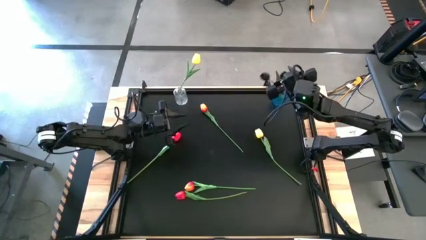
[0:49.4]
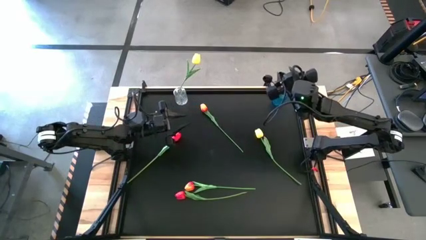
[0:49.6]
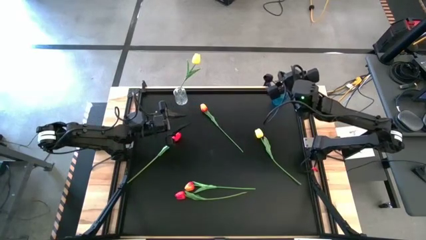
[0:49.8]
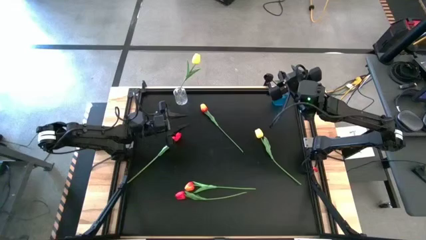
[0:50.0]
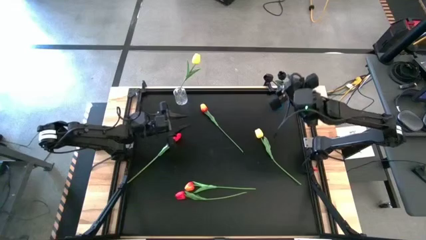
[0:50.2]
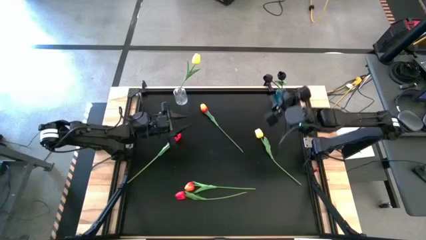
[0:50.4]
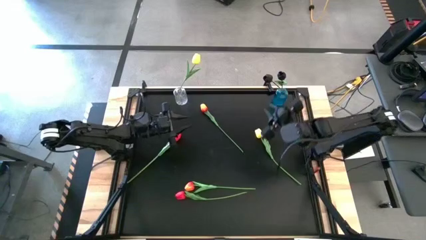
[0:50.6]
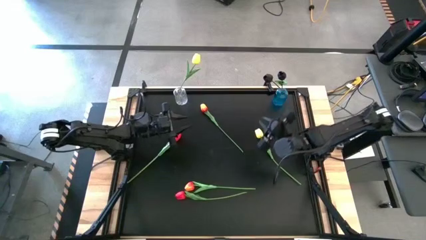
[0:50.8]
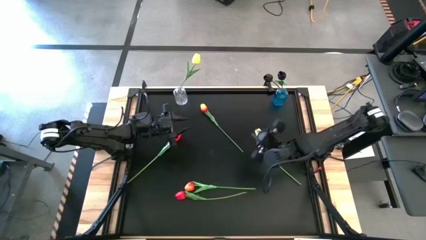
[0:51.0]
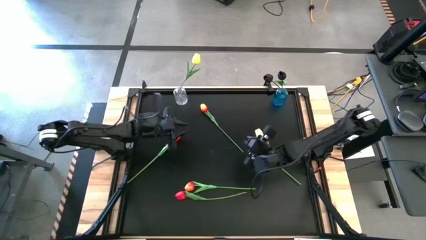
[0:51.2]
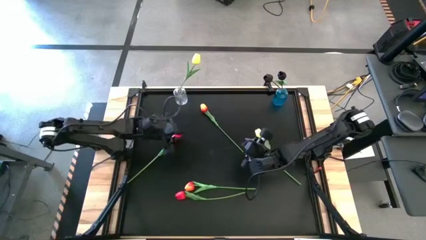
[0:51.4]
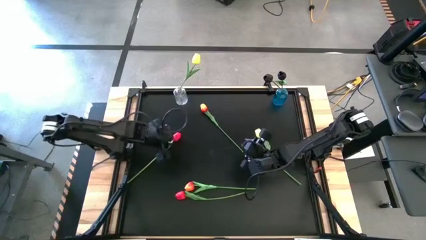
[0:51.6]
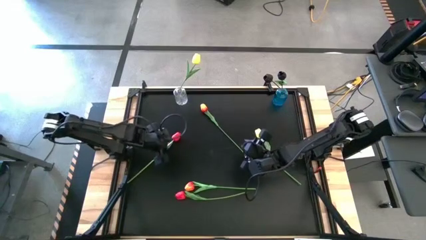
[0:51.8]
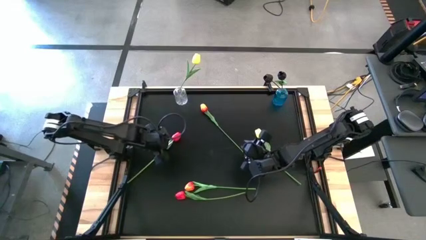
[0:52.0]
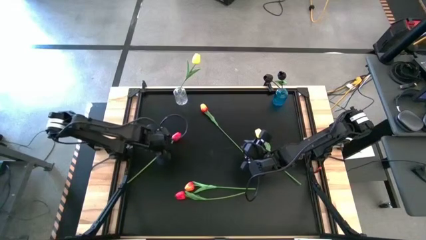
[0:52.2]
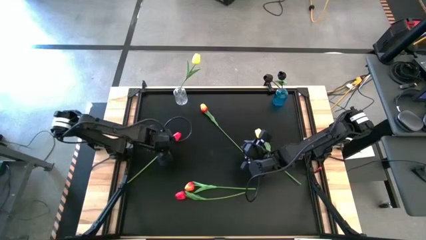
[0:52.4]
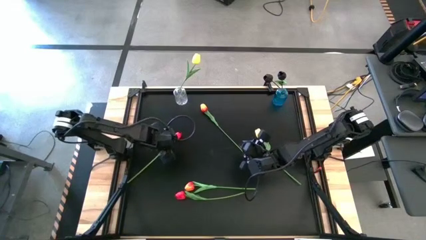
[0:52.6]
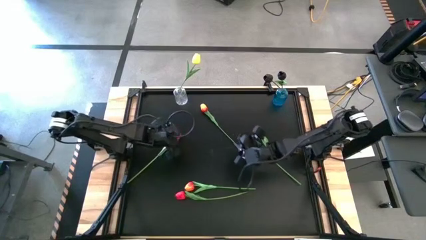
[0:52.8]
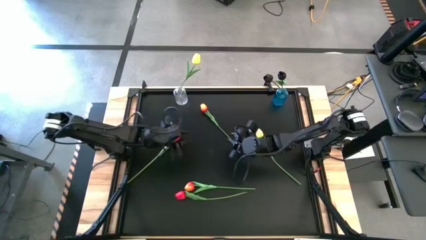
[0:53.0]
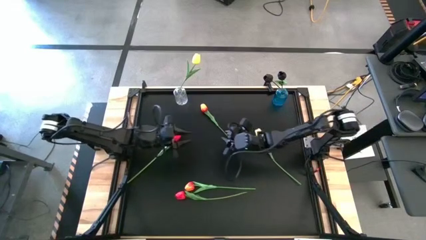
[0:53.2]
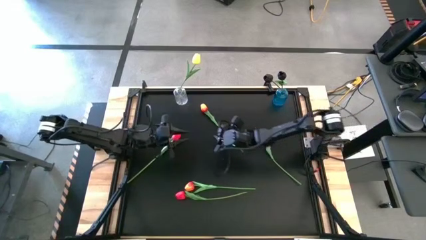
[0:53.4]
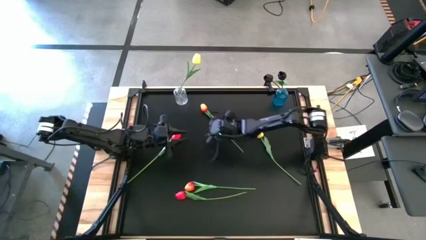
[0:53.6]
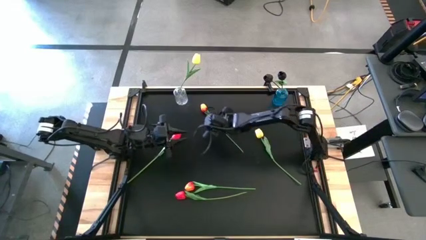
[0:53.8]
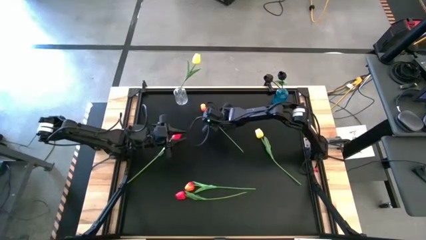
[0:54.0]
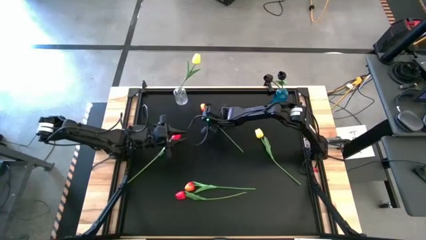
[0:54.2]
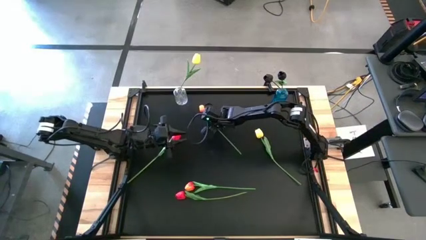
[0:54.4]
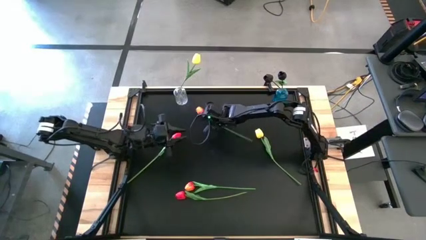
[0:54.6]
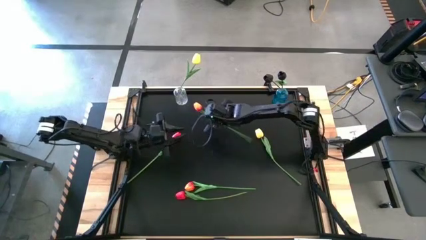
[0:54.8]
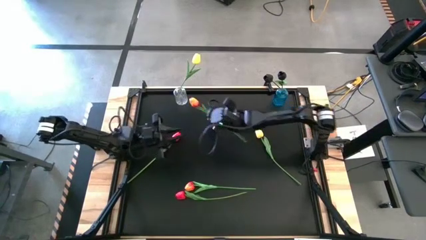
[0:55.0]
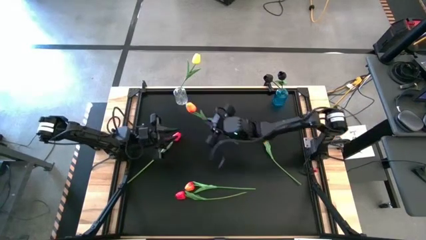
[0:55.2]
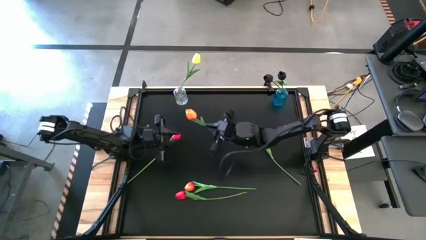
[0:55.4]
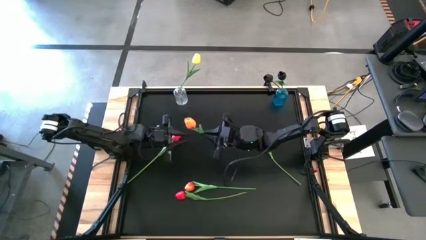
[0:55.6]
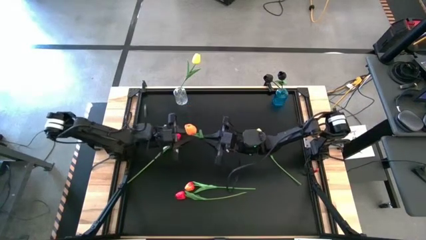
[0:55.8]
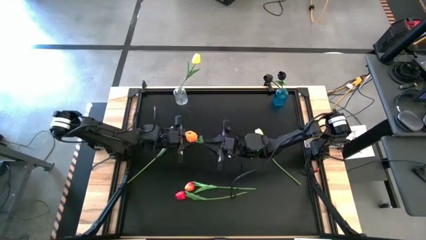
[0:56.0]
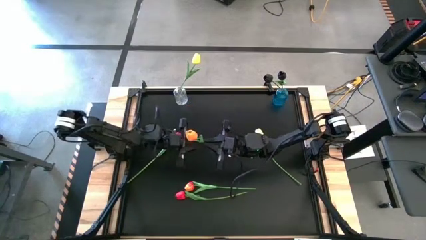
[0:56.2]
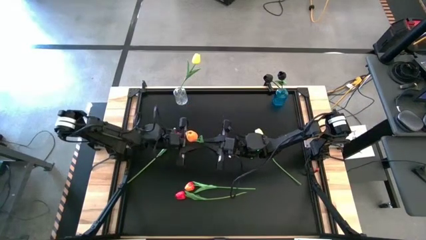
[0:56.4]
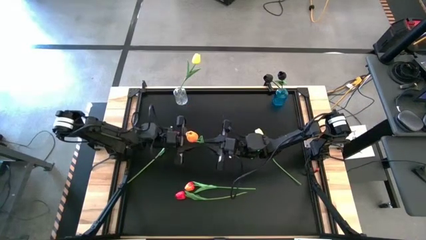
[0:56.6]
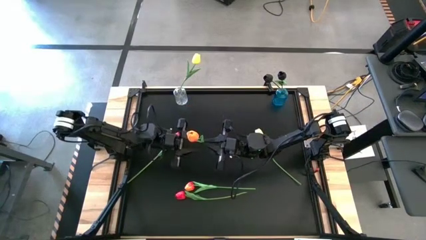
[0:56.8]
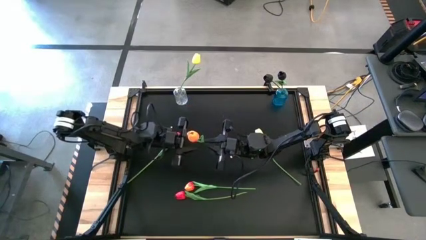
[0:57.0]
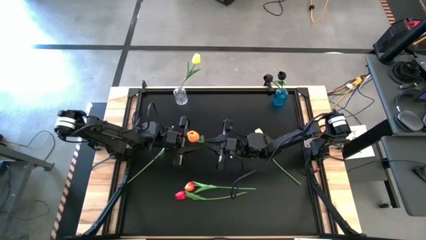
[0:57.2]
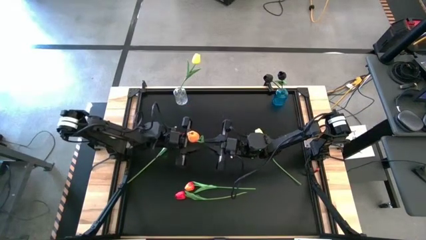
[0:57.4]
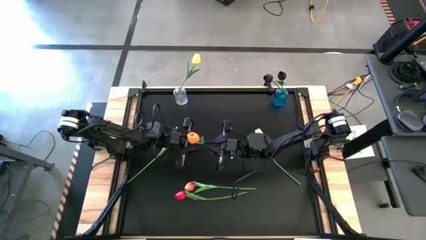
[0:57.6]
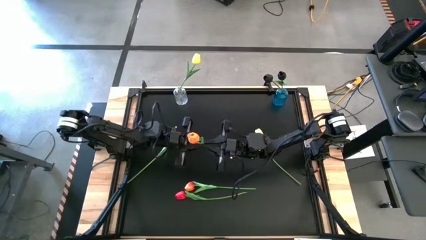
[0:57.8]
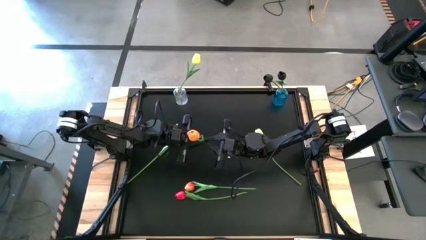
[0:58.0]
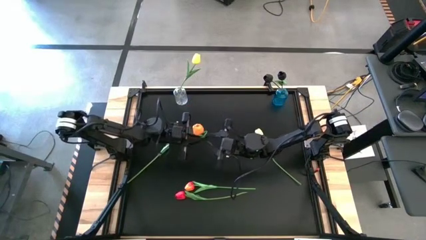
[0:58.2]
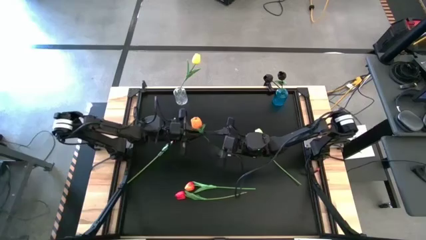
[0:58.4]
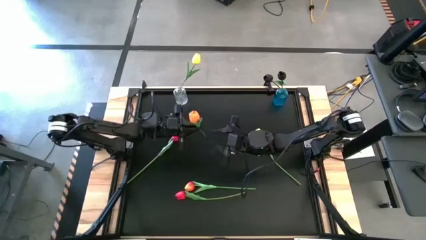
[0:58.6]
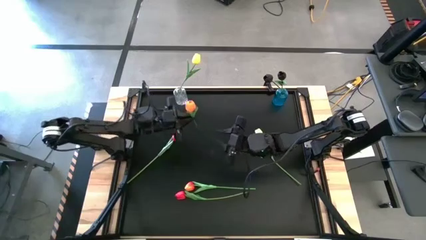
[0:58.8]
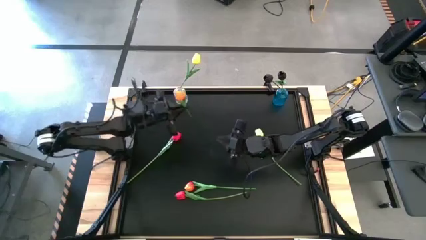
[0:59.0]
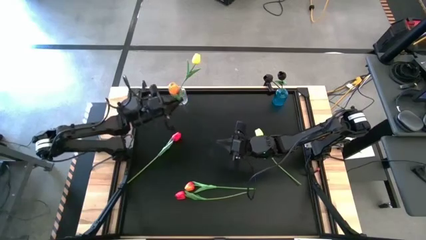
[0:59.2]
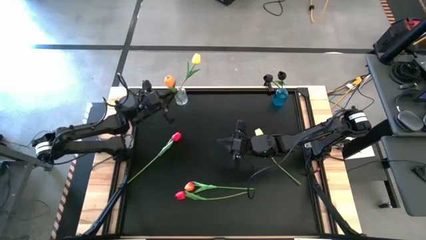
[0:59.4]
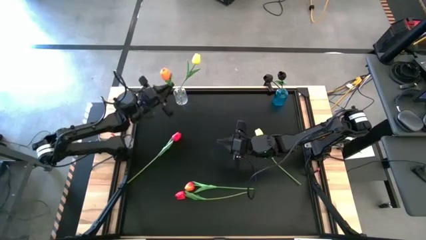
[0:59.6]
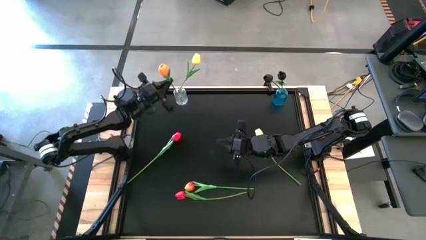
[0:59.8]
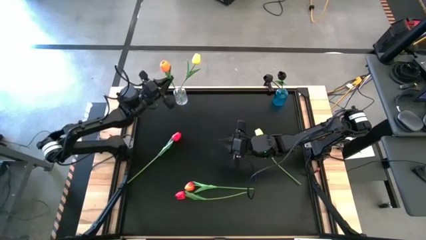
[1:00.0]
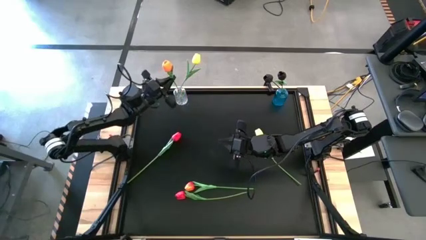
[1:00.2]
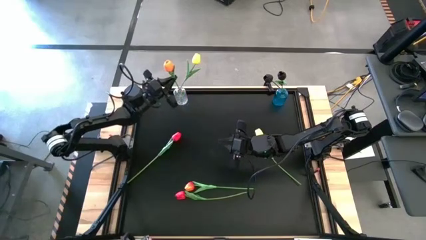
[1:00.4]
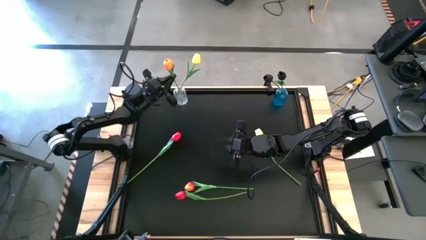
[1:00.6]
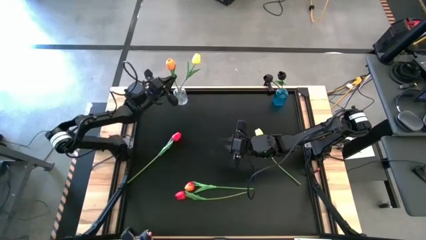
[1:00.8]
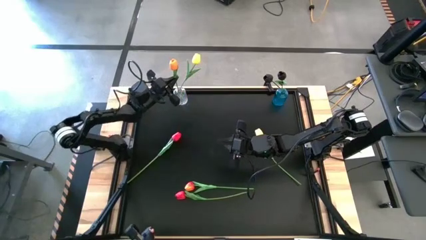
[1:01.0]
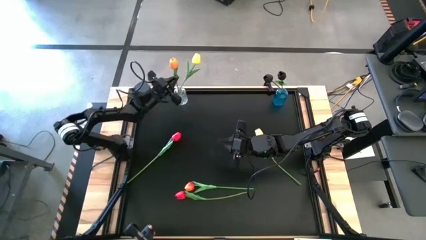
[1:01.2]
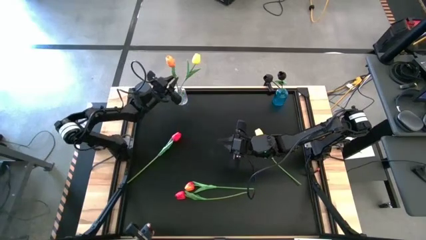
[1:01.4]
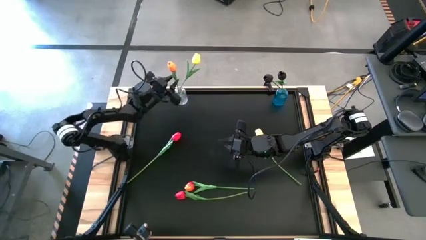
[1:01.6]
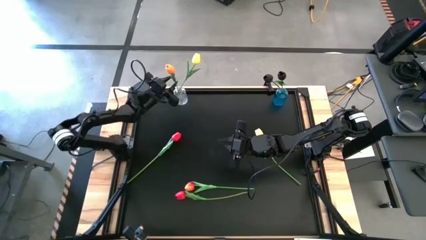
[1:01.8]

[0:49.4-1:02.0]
Task: Sort flowers into vase by color
Put the top orange flower into the transparent vase

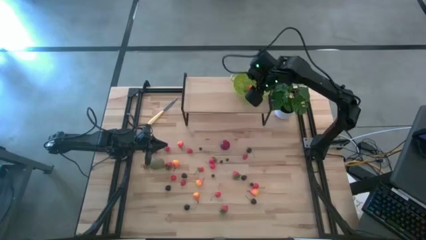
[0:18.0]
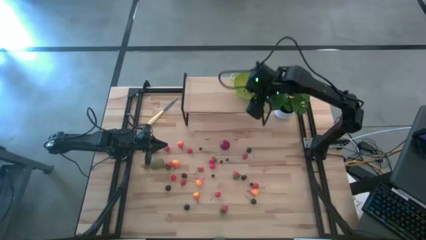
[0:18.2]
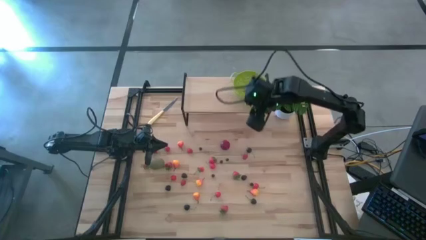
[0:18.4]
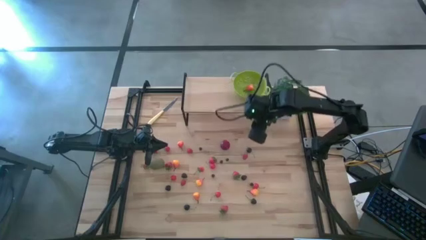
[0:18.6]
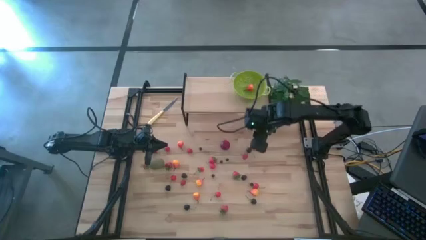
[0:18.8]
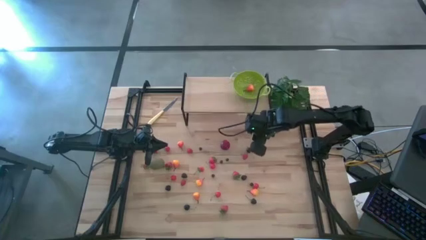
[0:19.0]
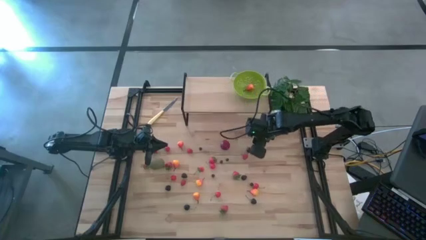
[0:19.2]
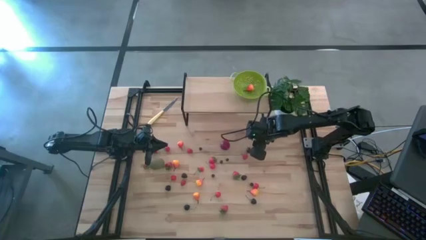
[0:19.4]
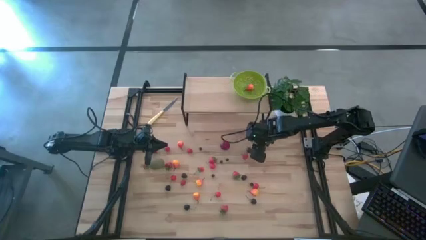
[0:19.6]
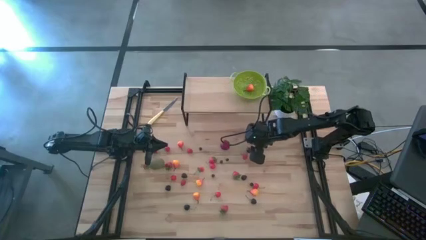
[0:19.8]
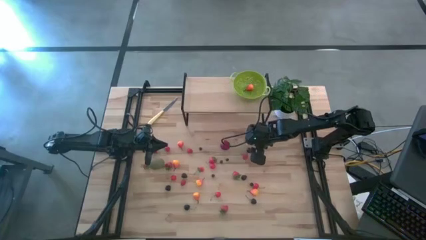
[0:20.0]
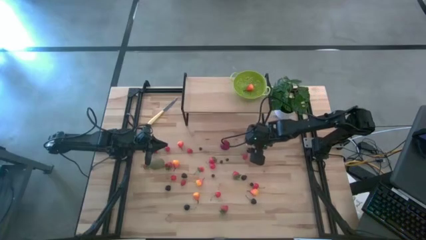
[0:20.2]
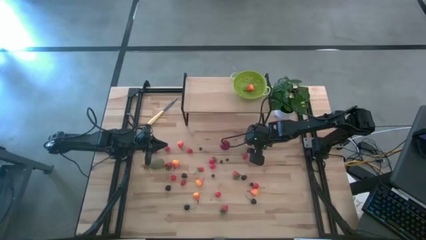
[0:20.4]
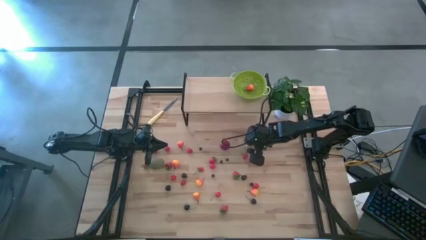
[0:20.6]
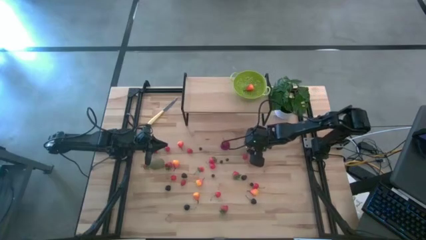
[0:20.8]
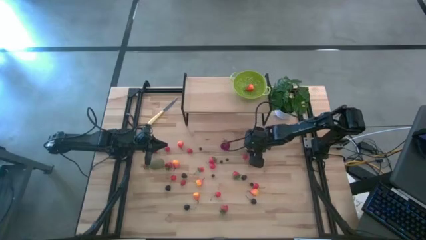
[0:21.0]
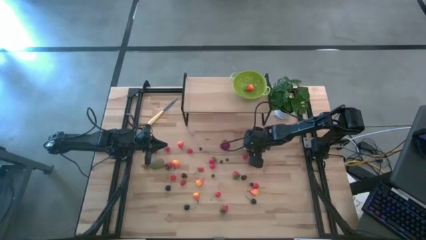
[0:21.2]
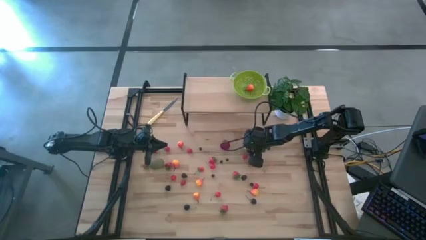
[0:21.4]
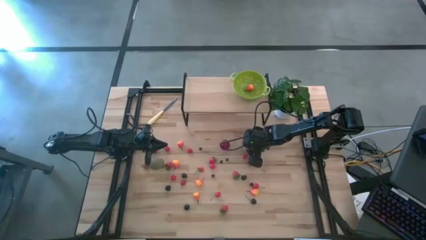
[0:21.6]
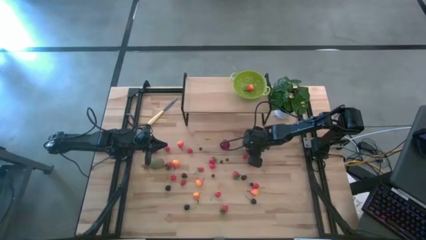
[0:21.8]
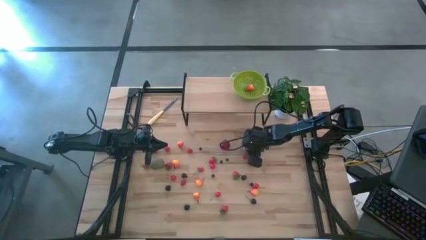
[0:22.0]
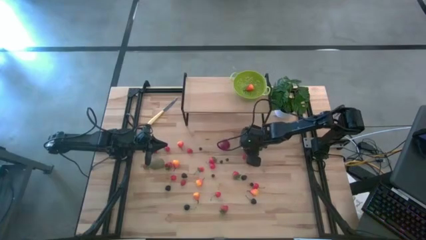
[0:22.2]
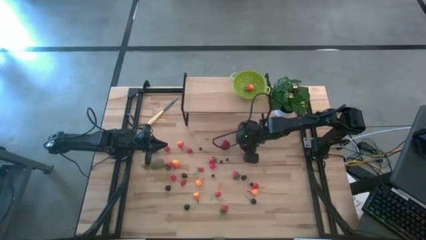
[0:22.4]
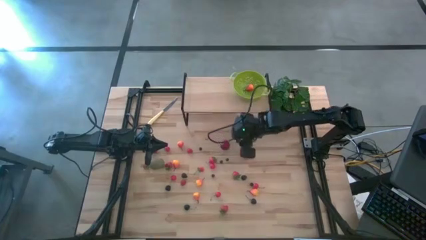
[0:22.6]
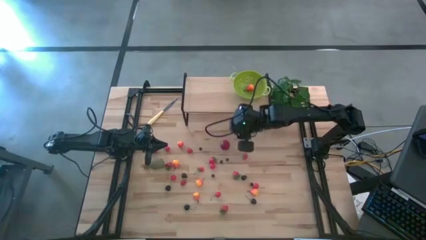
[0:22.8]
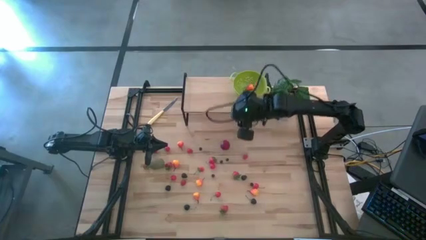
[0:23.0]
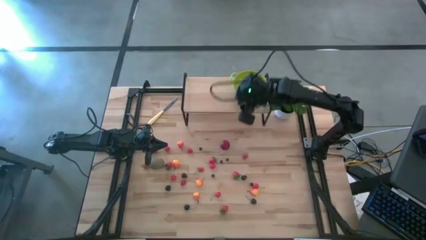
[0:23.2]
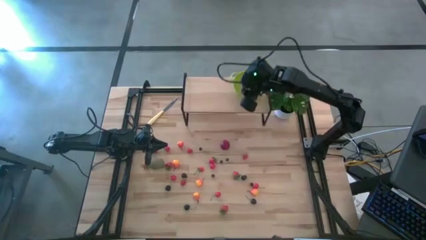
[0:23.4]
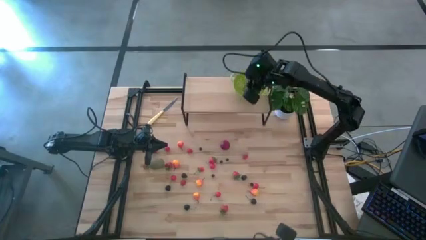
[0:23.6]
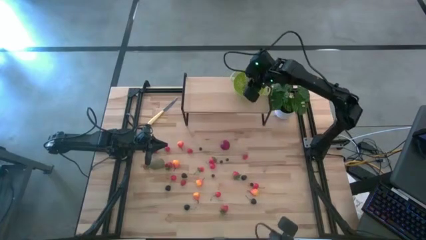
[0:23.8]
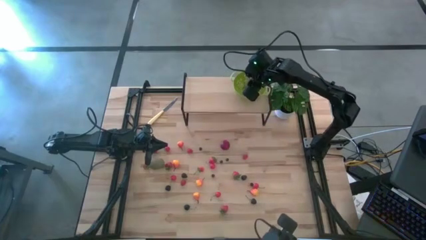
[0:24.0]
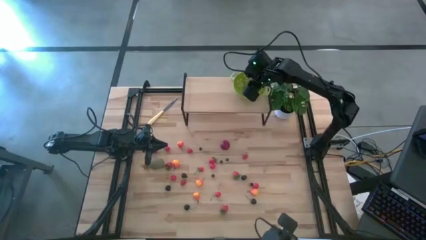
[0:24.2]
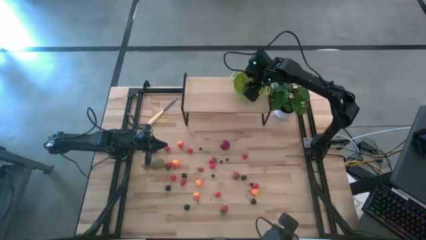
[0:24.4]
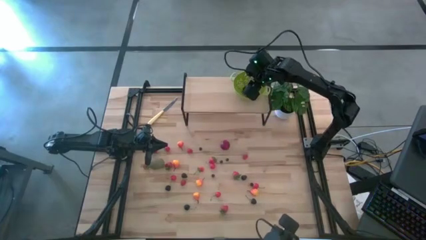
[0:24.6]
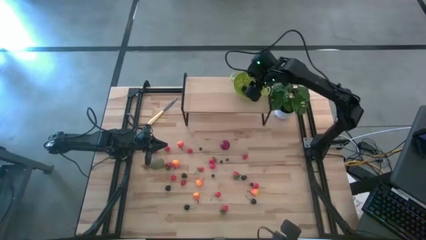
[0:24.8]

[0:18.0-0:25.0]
Task: Build produce basket
Put the black cherry into the green basket
